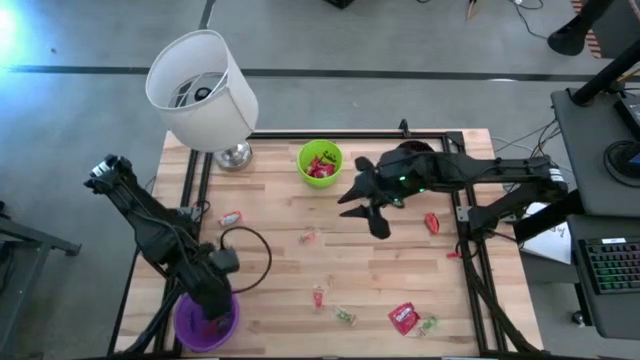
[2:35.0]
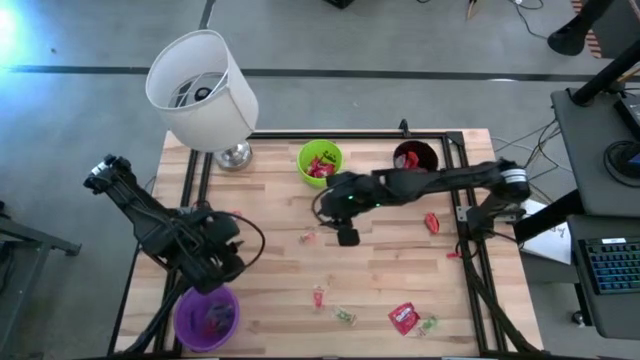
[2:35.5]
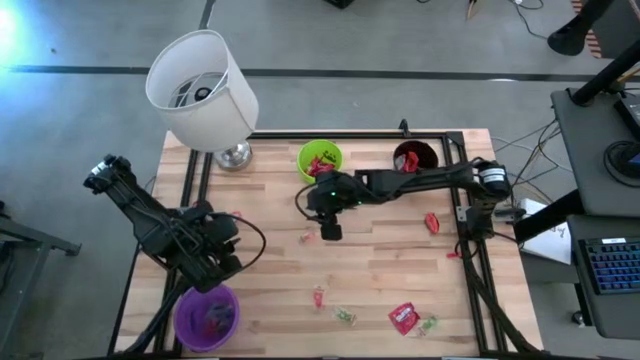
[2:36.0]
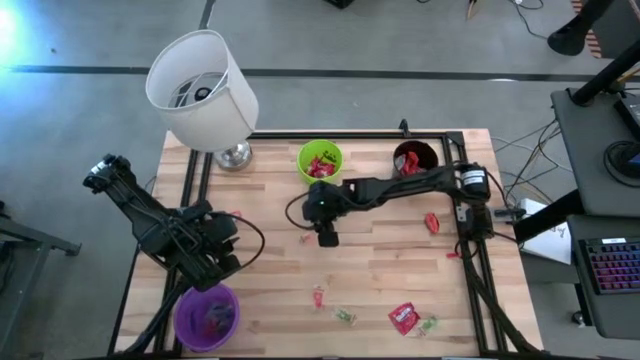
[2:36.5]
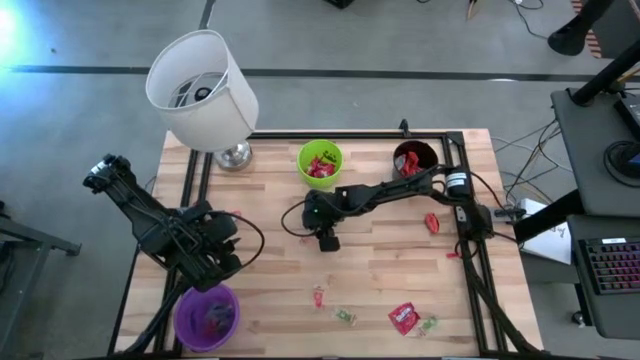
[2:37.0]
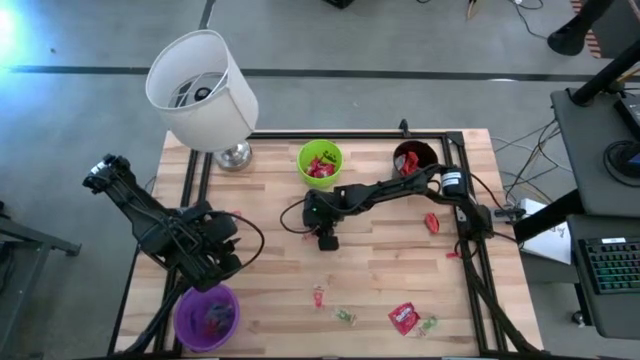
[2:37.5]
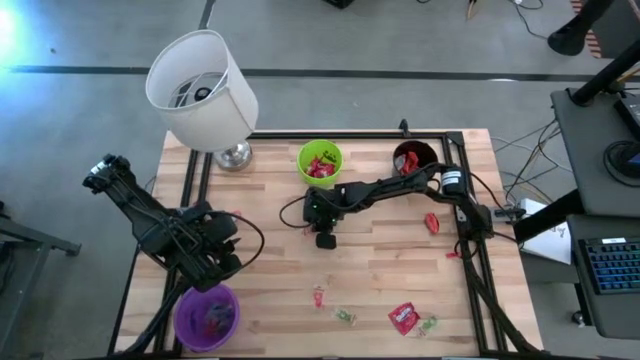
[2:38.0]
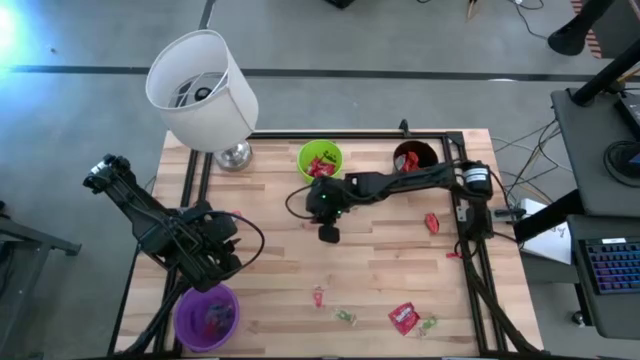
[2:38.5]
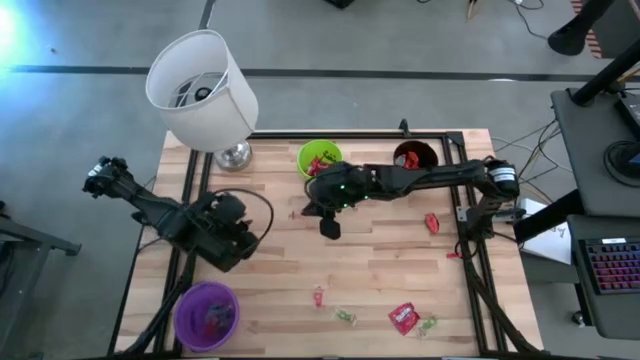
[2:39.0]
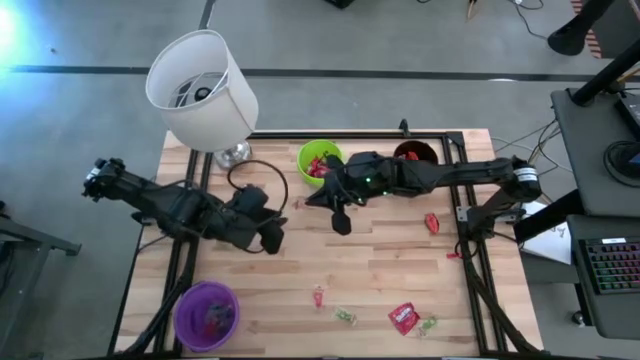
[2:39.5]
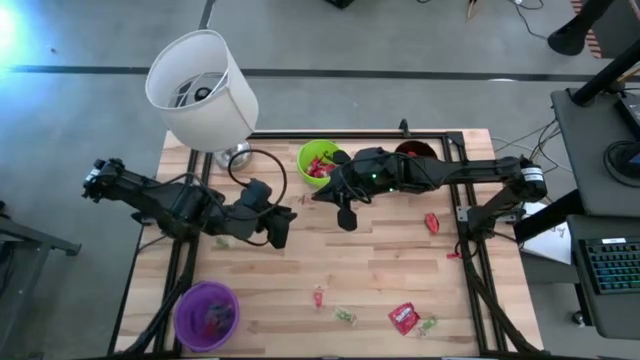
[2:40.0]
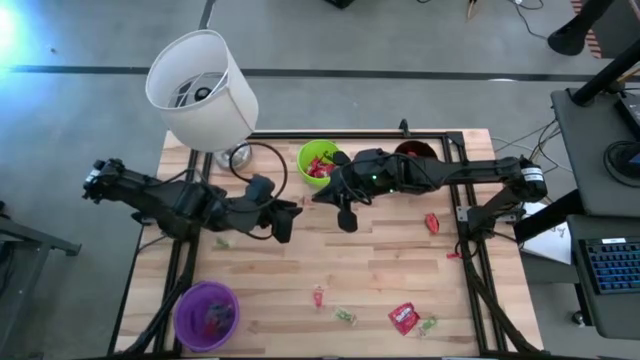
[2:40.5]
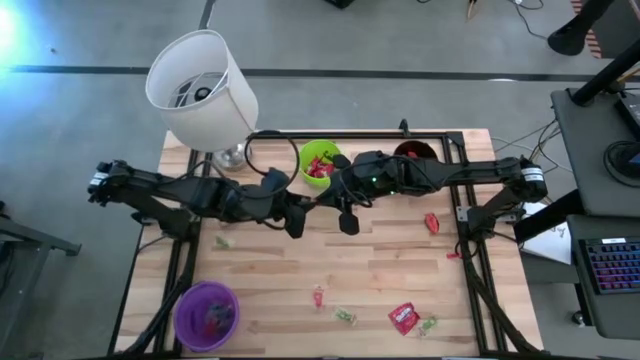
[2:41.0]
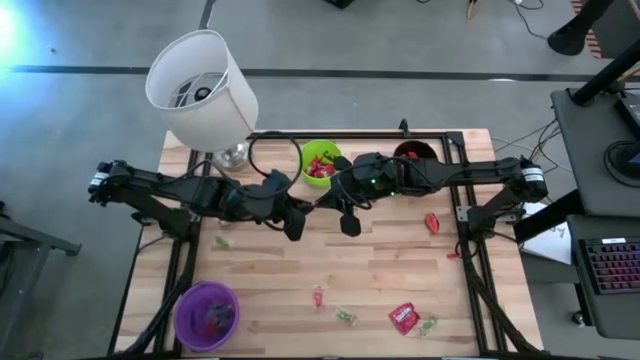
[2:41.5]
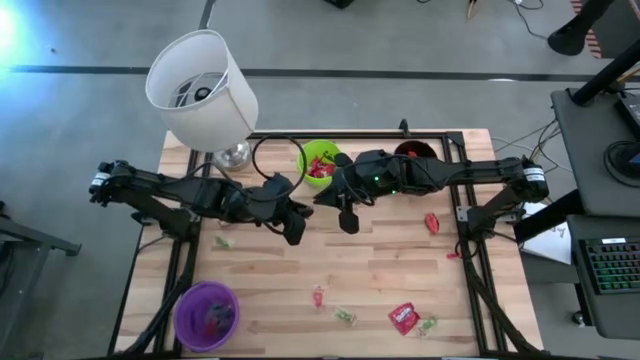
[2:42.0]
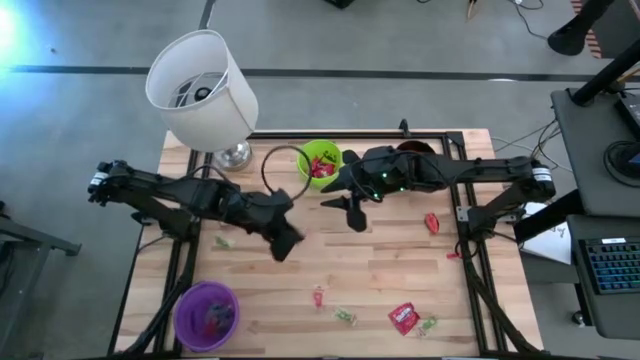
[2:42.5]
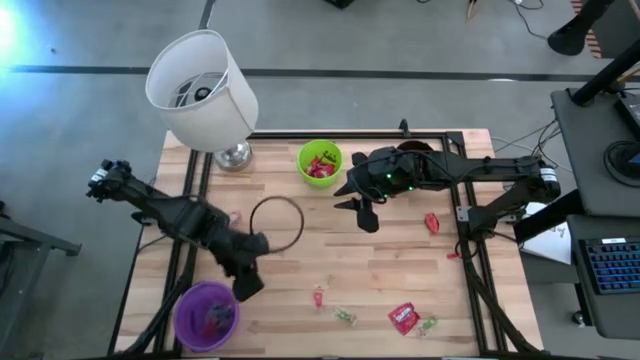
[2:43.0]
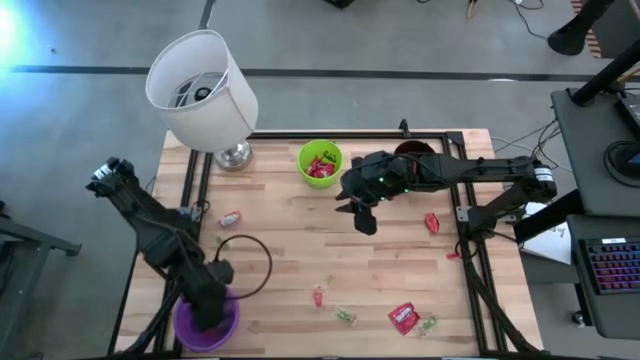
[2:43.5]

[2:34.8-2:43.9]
Task: Sort candy
Put the orange gummy candy into the violet bucket

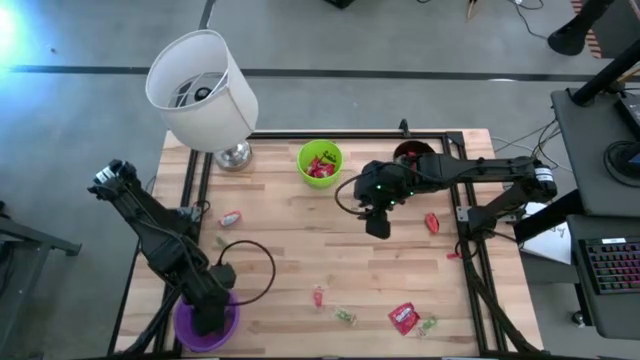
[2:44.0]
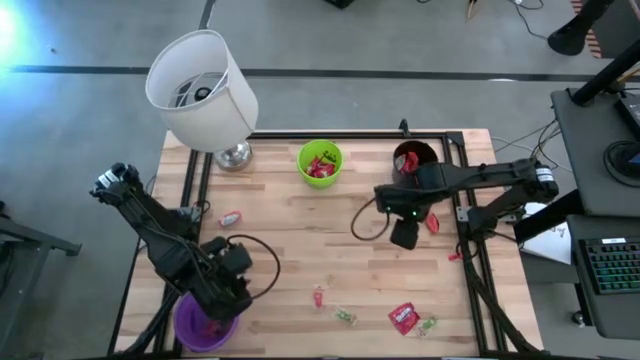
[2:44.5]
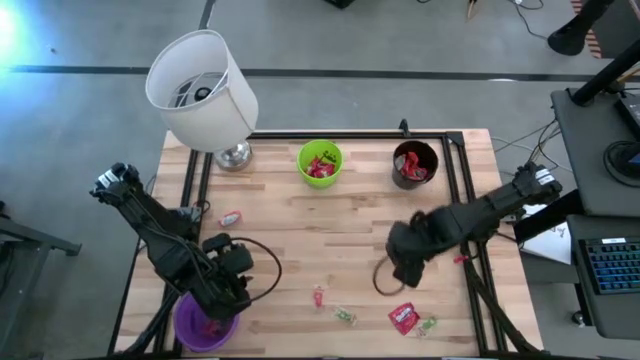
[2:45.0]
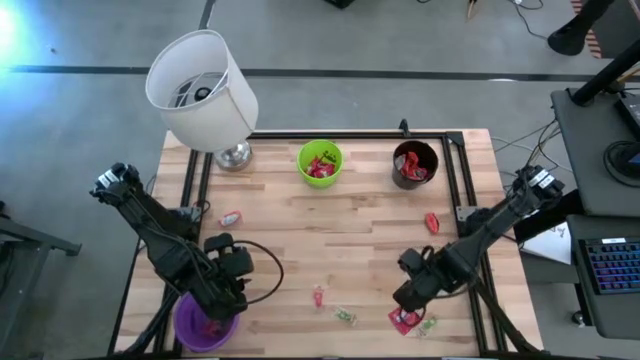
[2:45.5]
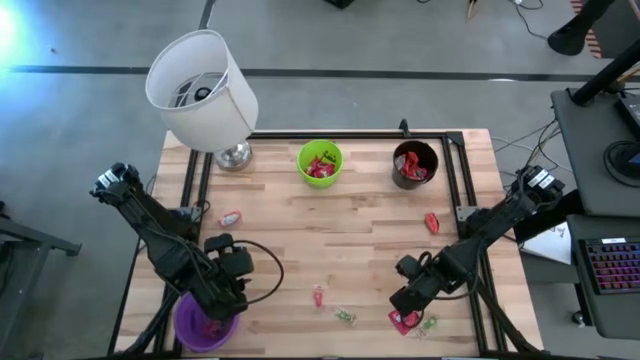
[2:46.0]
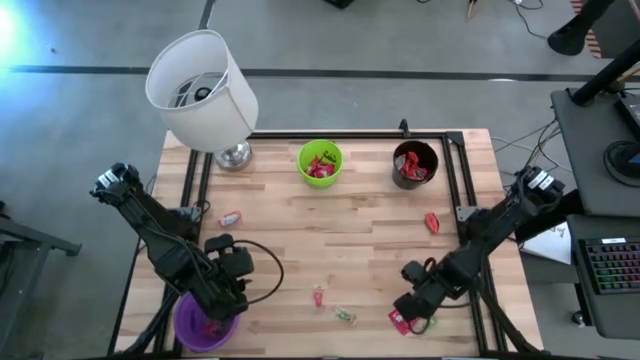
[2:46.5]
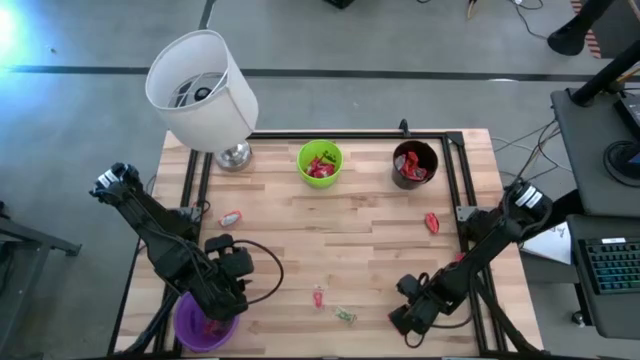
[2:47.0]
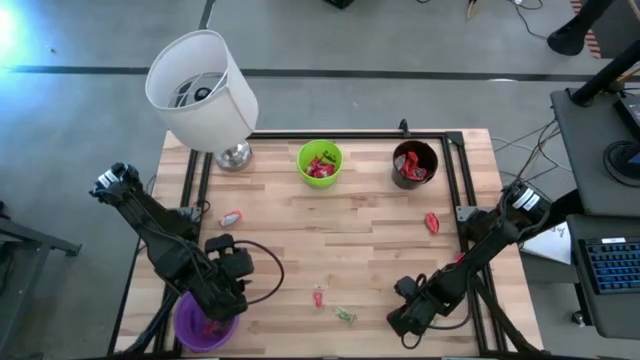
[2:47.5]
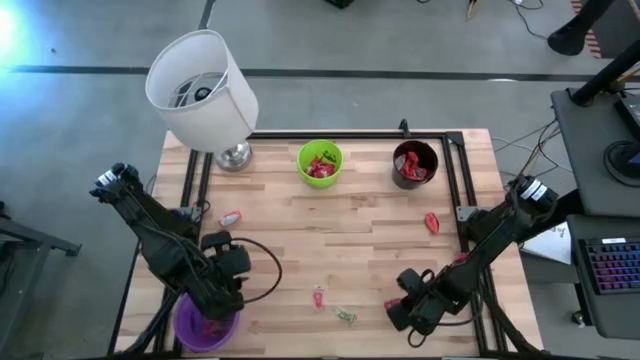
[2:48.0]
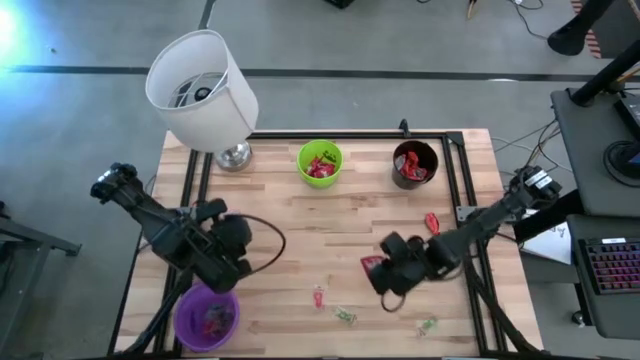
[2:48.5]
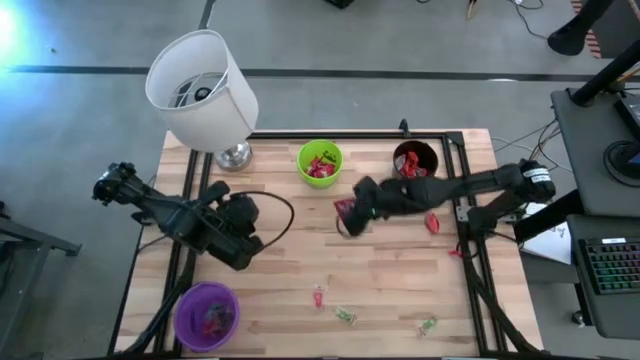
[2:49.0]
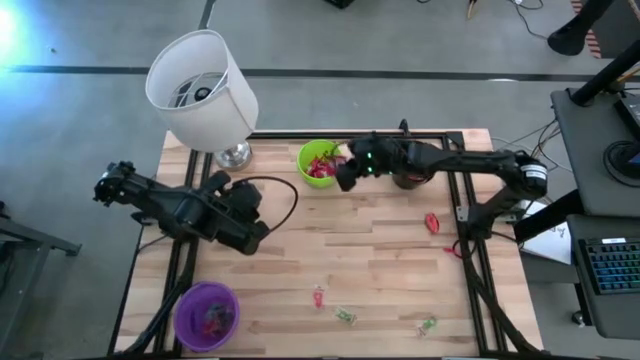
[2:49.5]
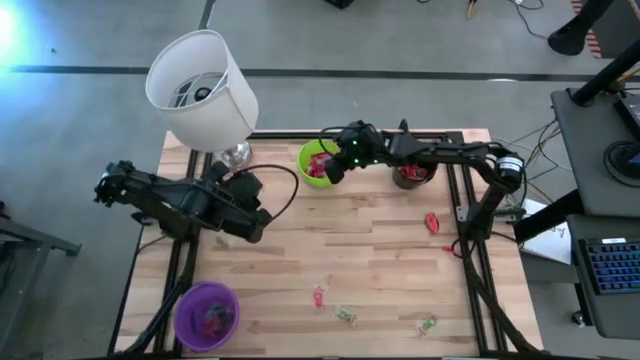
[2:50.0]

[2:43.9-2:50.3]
Put the red candy into the green bucket

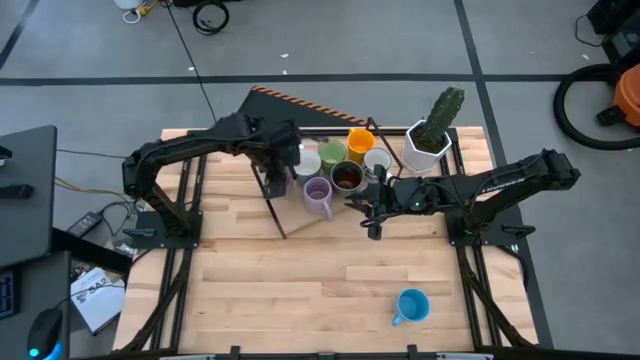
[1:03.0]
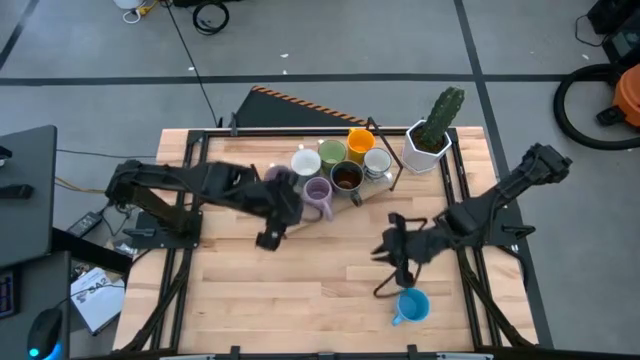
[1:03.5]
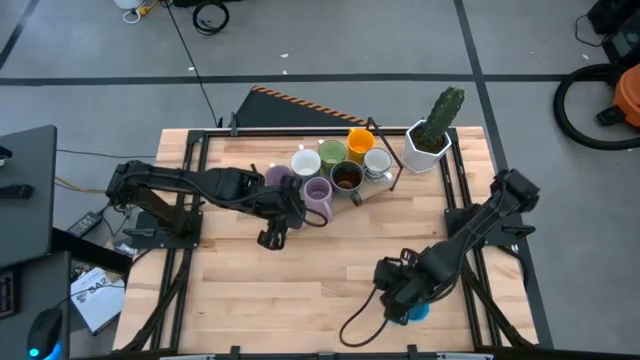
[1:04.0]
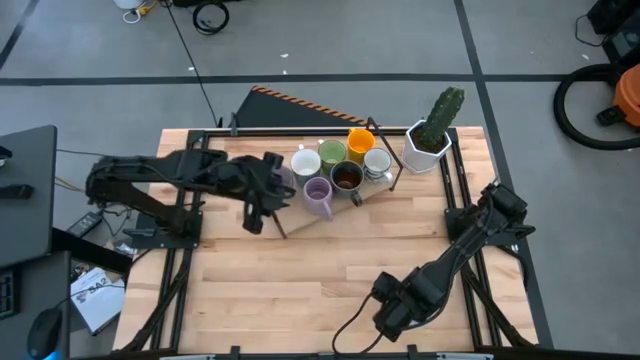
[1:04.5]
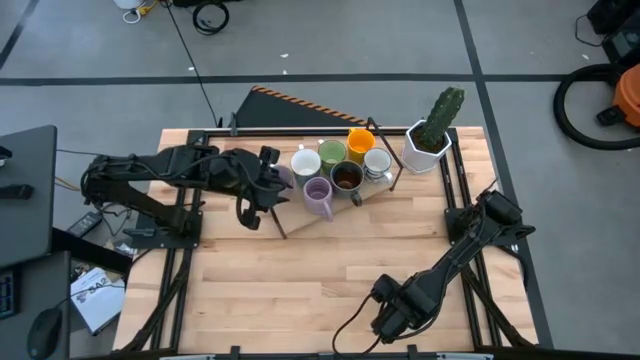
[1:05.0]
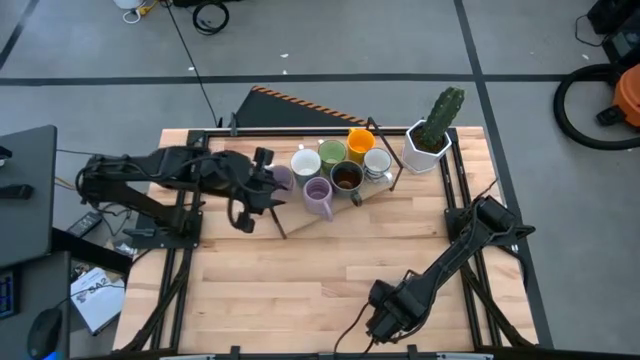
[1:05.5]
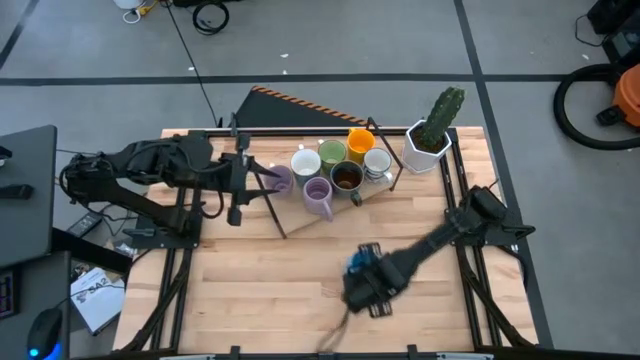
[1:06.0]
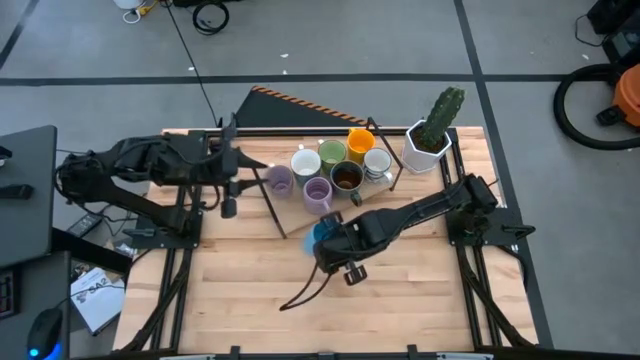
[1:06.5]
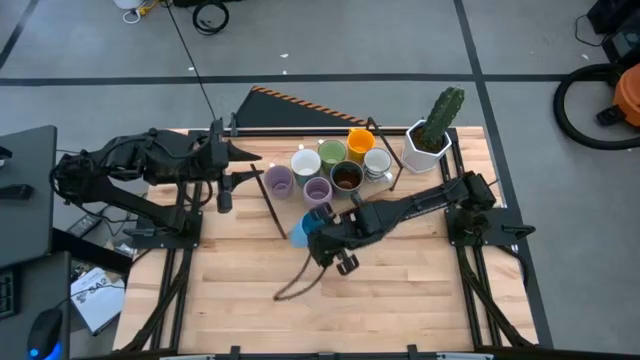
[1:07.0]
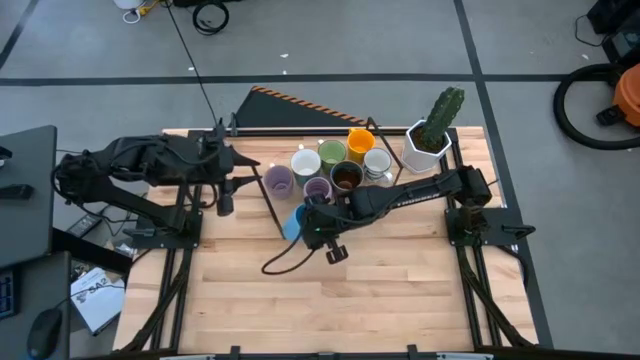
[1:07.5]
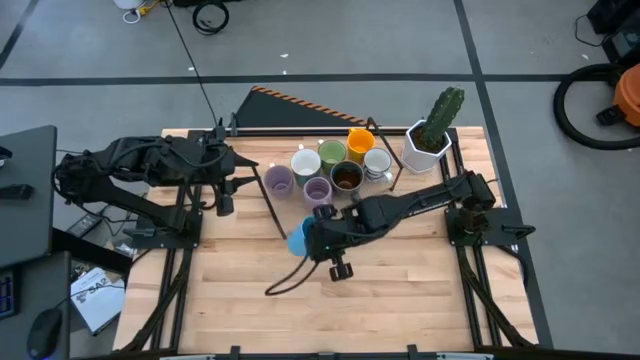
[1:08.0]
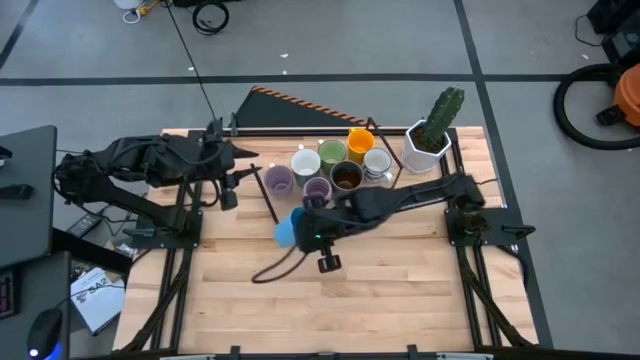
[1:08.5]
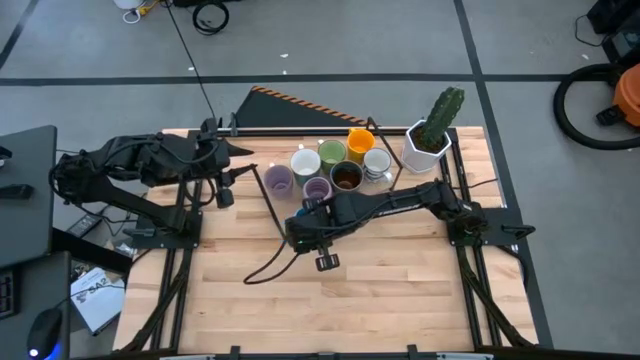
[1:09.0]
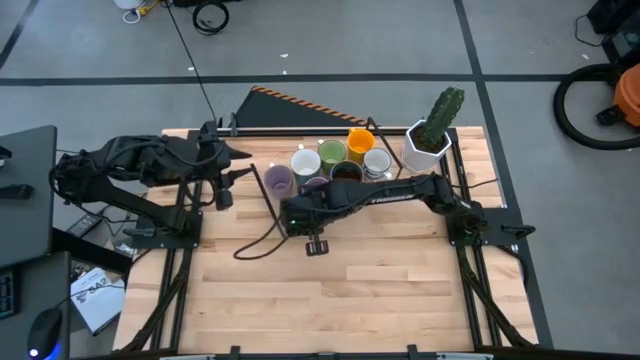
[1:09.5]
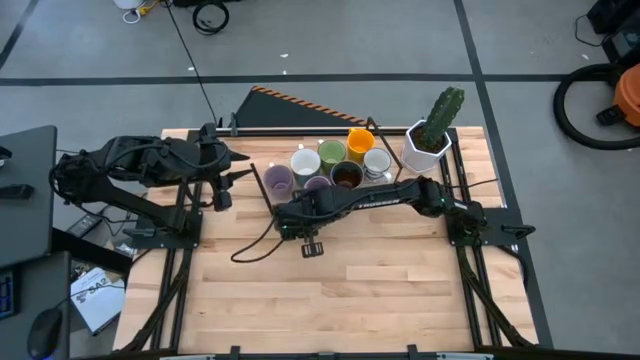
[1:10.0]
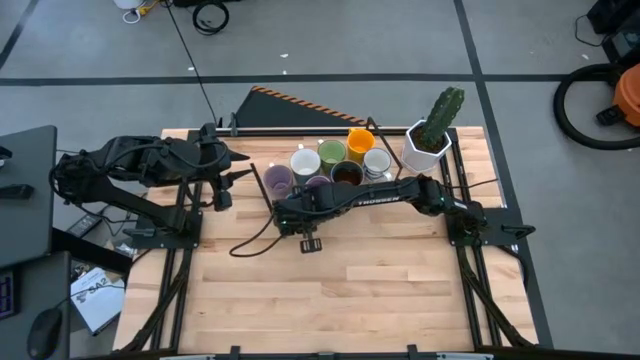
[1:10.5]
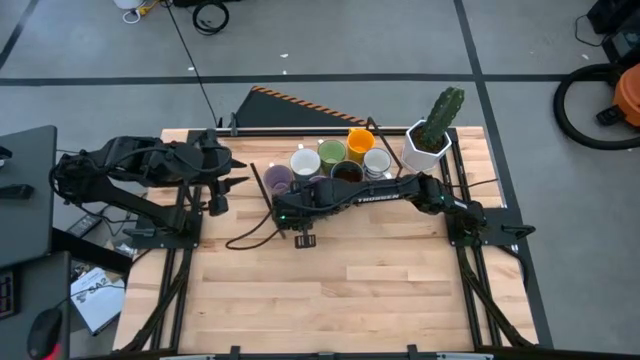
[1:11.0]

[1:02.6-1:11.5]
Task: Place coffee mugs
Put the blue mug on the shelf
